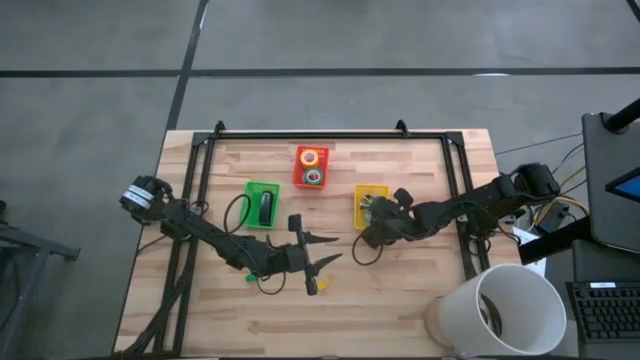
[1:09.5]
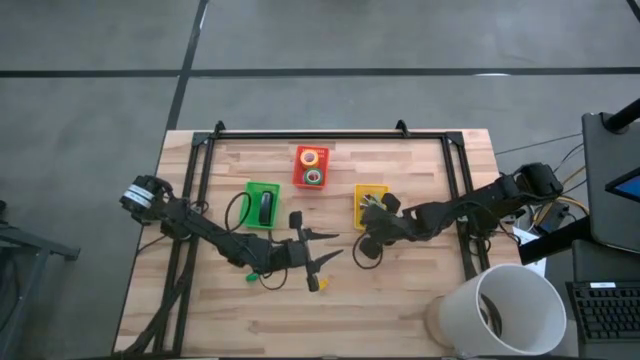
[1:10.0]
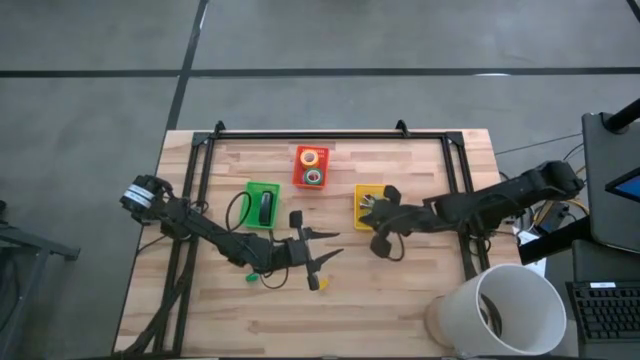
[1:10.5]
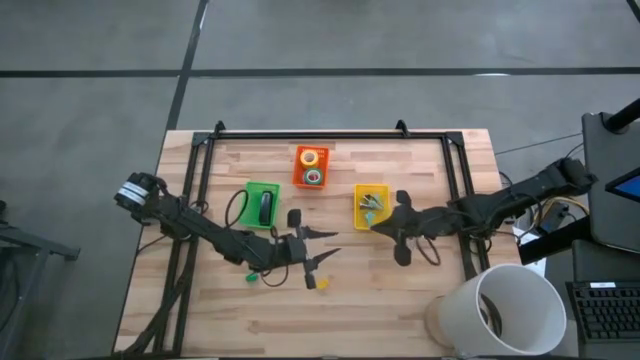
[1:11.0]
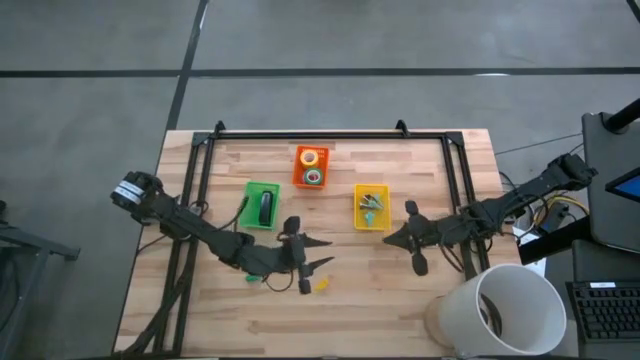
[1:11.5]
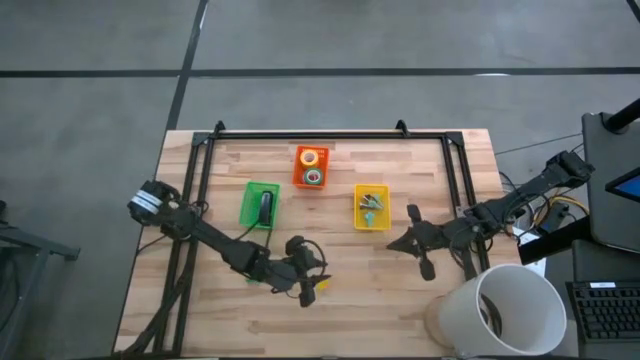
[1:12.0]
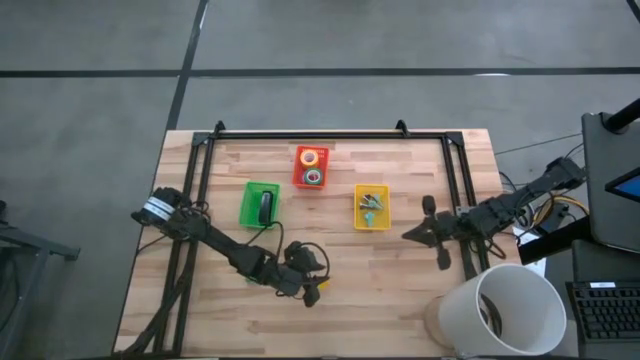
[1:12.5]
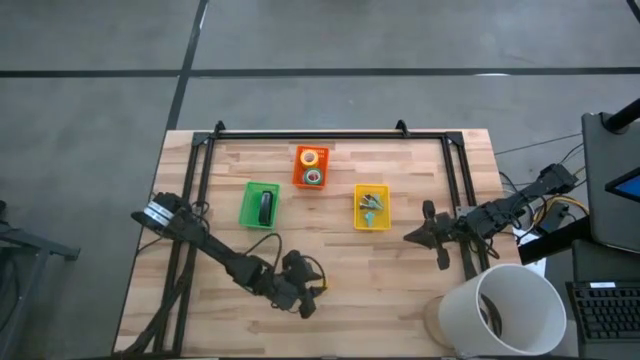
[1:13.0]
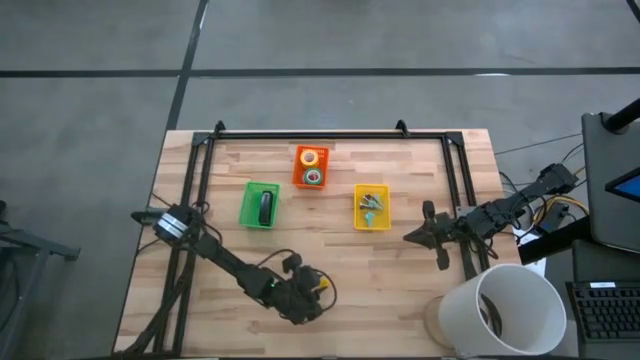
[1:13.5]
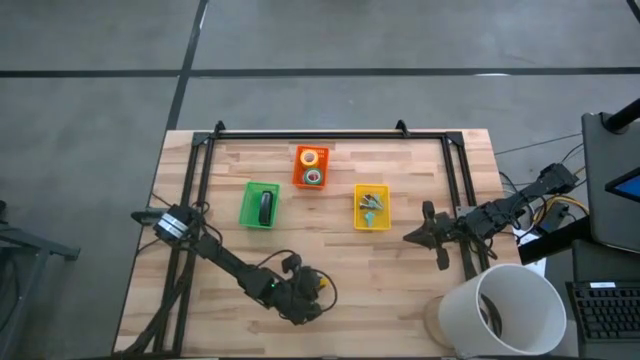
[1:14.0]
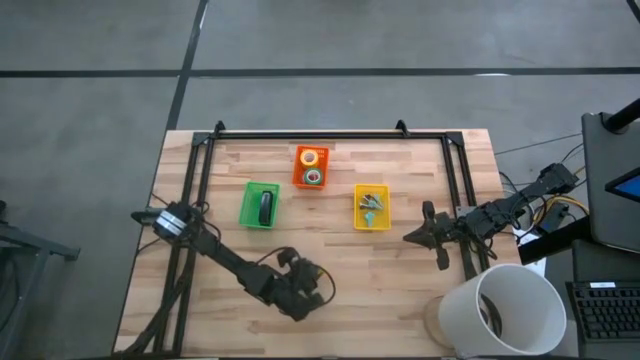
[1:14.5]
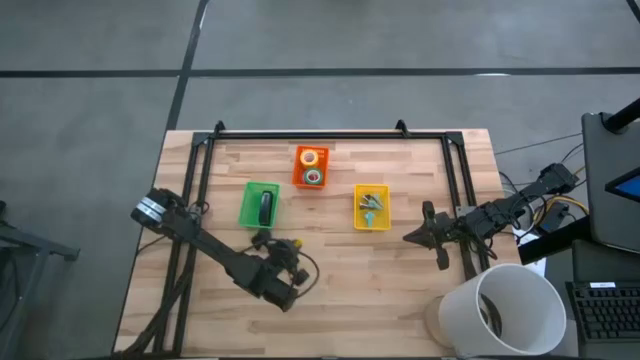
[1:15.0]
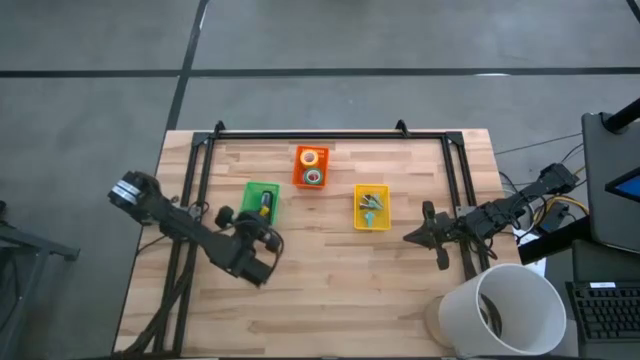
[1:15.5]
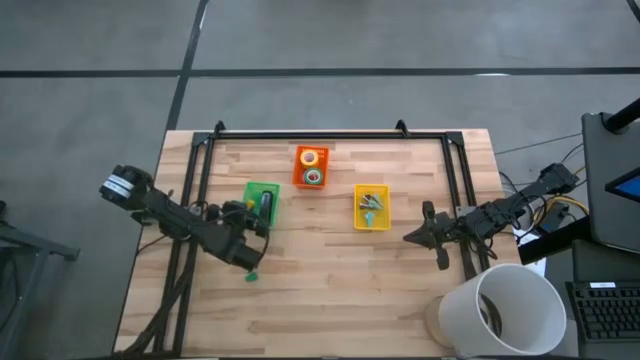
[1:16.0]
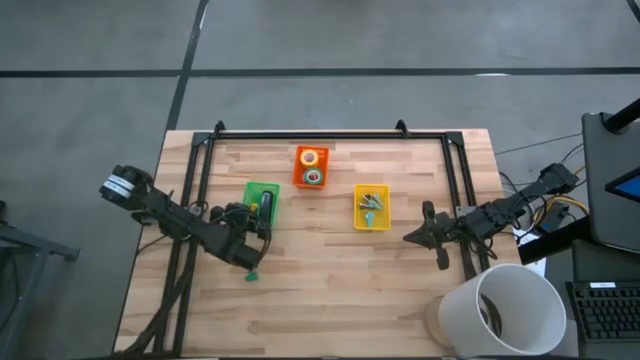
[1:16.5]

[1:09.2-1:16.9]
Task: Pick and place Stapler, Stapler remover, tape
Put the yellow stapler into the green basket

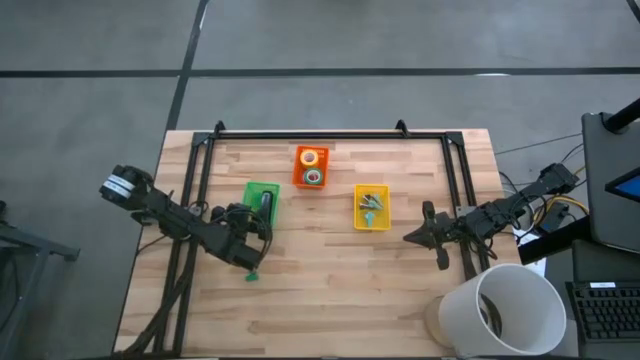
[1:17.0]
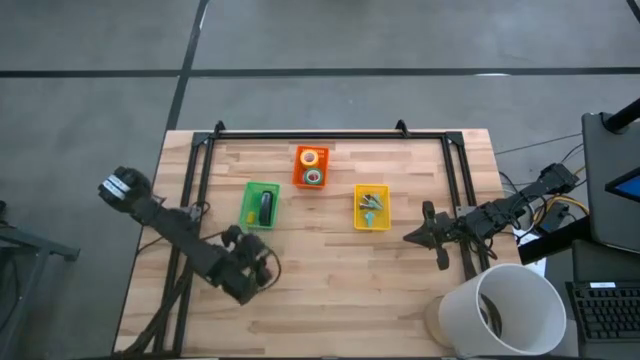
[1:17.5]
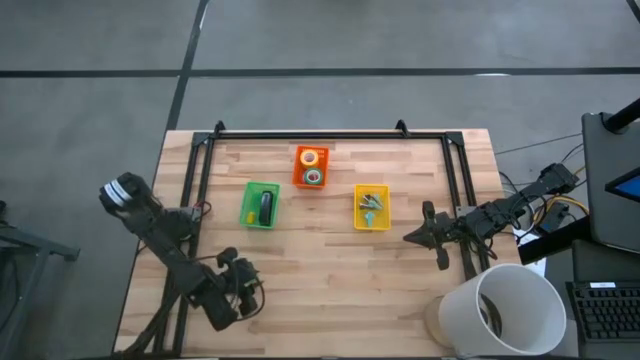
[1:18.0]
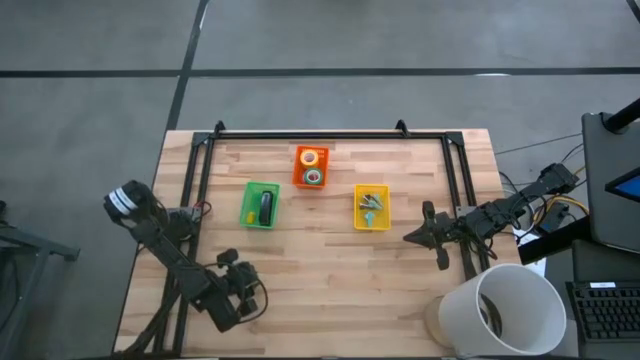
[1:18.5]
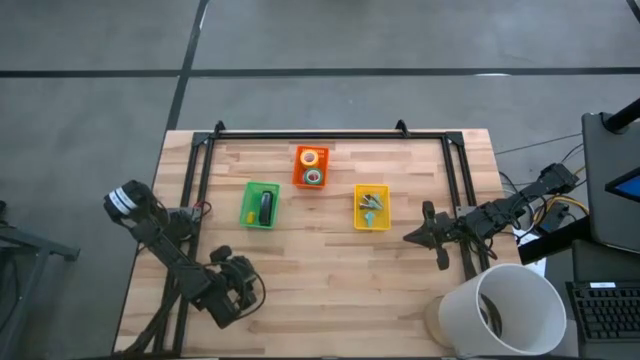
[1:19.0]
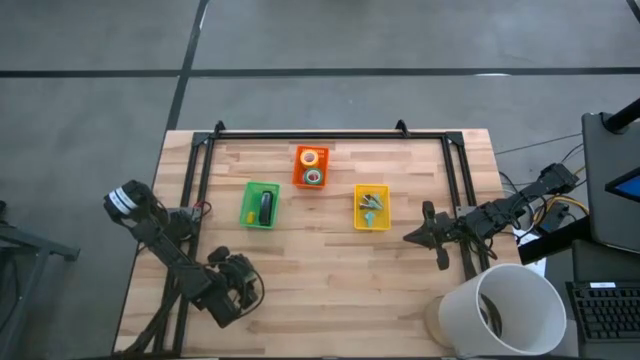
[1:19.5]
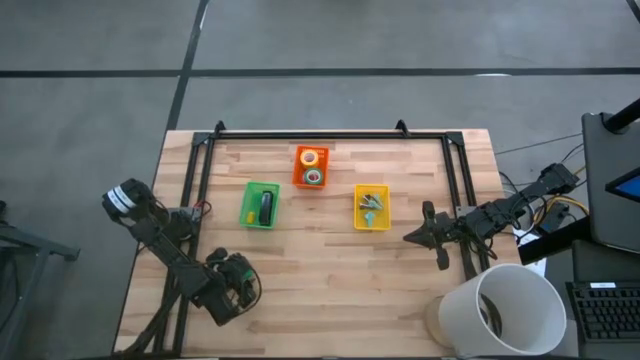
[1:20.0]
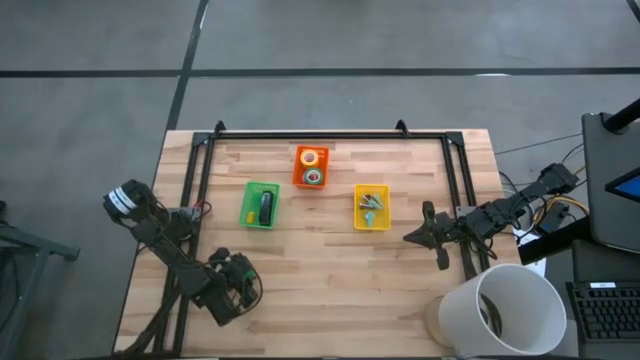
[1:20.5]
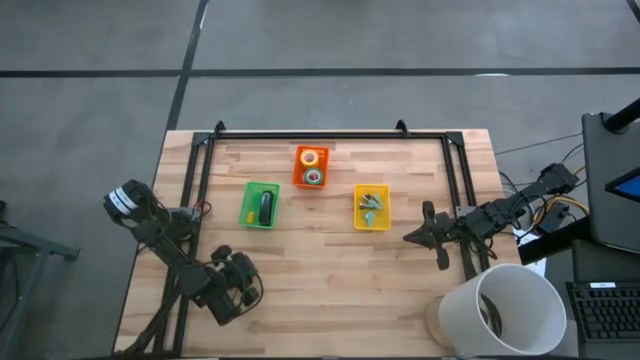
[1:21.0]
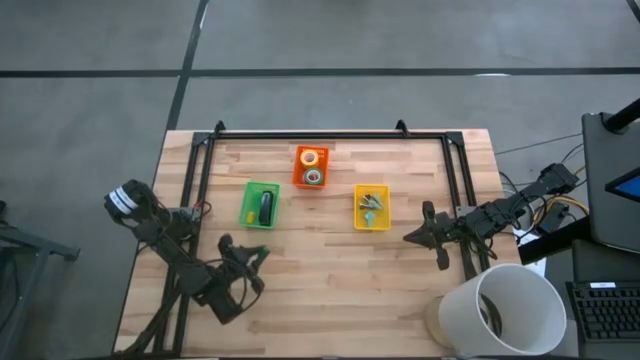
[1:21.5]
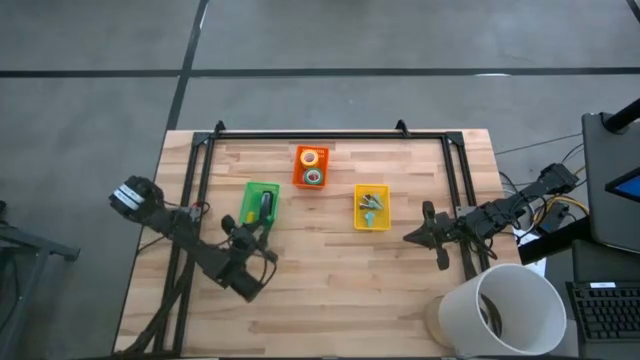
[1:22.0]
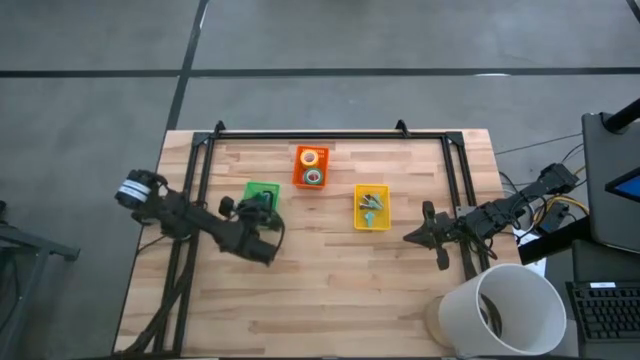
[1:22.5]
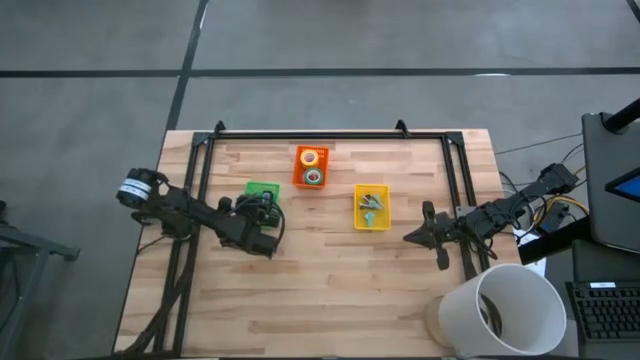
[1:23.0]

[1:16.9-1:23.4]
Put the green stapler into the green basket

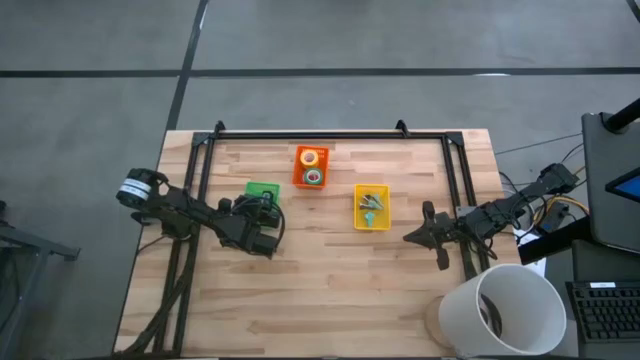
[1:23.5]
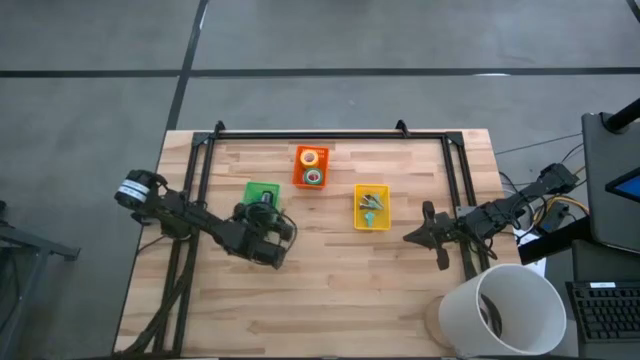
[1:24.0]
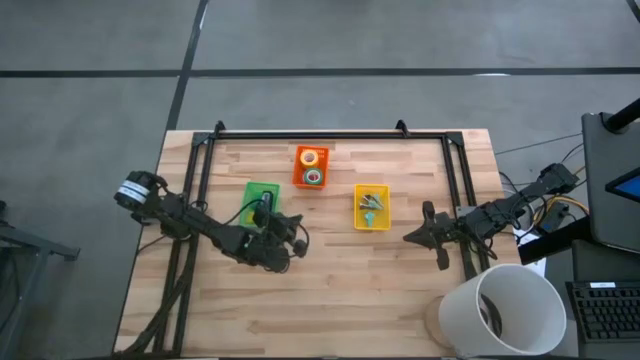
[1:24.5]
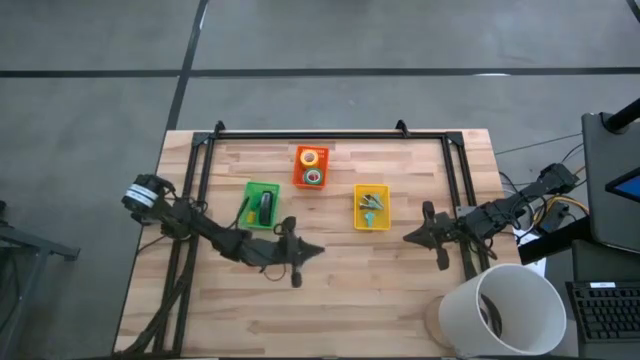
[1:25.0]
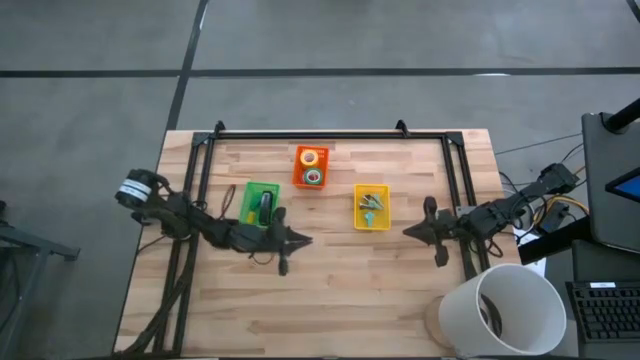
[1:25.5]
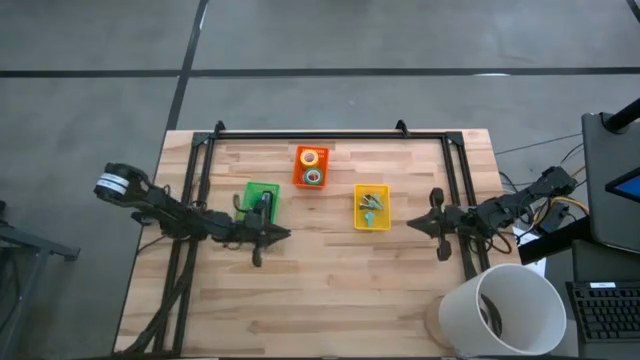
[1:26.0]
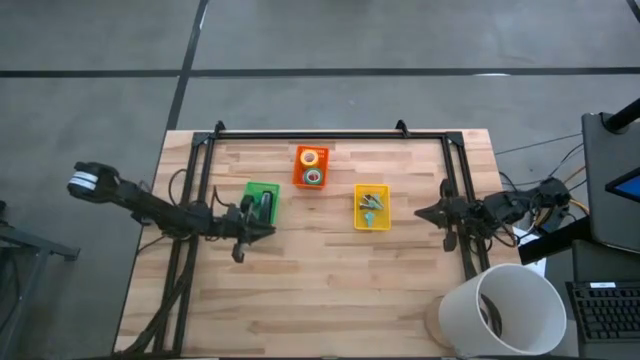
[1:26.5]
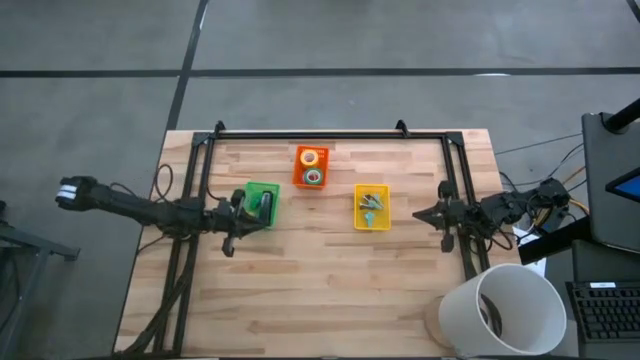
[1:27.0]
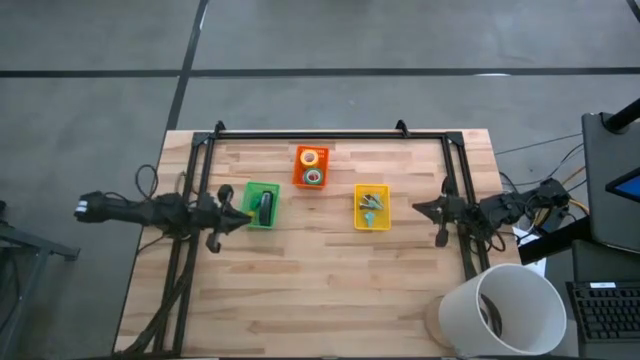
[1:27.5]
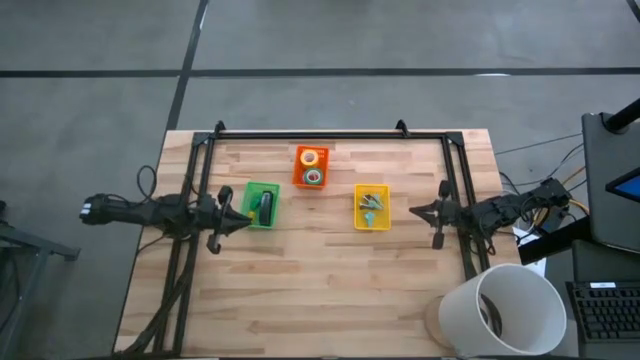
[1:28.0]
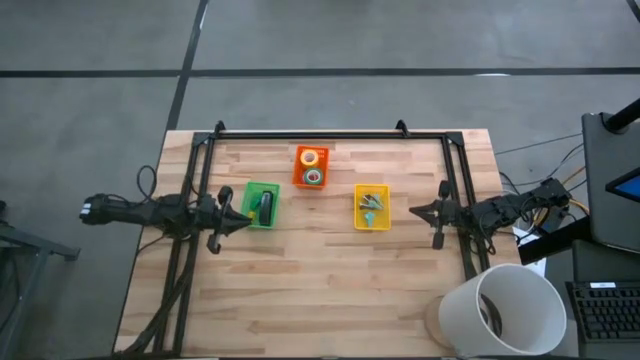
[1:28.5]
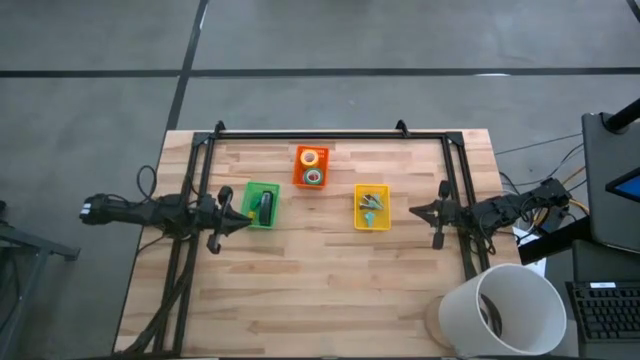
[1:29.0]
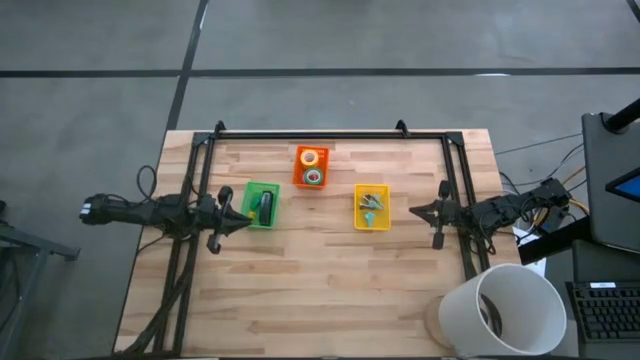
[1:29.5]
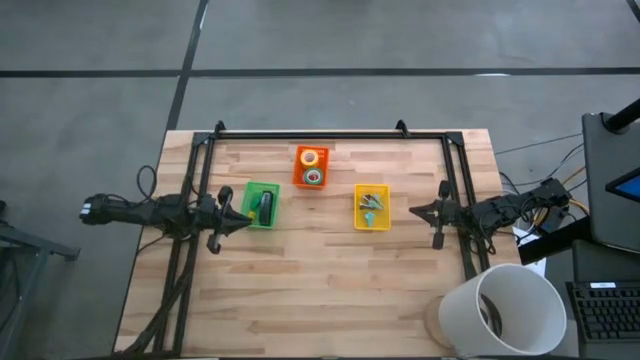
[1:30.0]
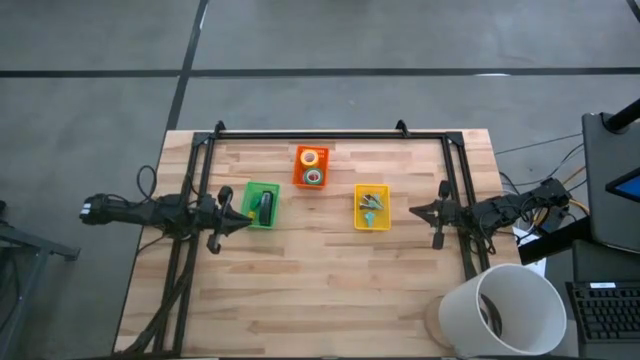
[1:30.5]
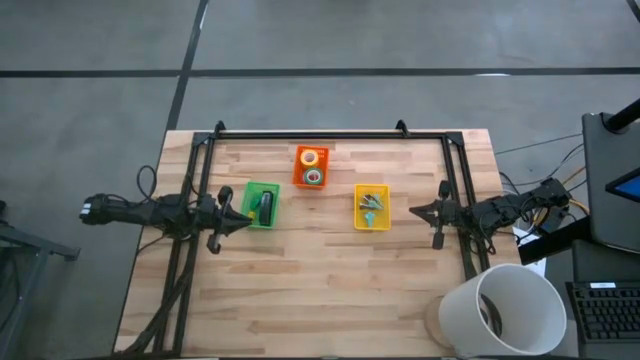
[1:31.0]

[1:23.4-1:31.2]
Return to Home Position
